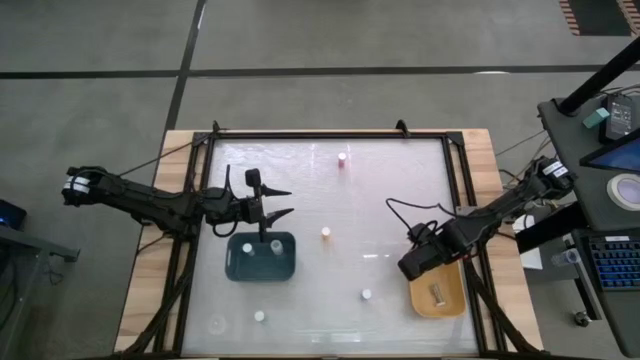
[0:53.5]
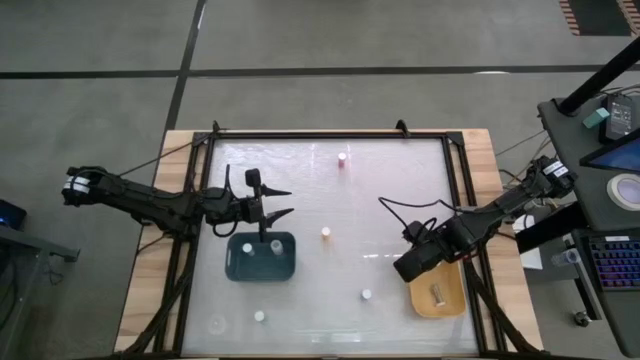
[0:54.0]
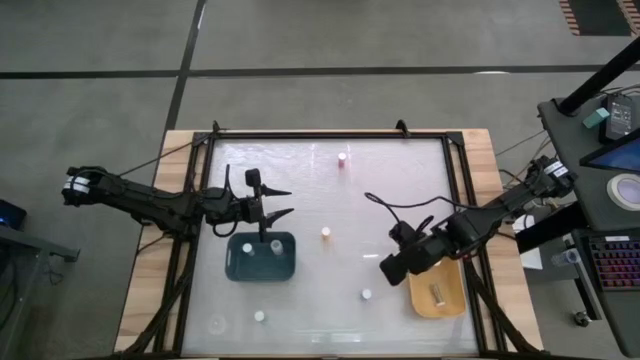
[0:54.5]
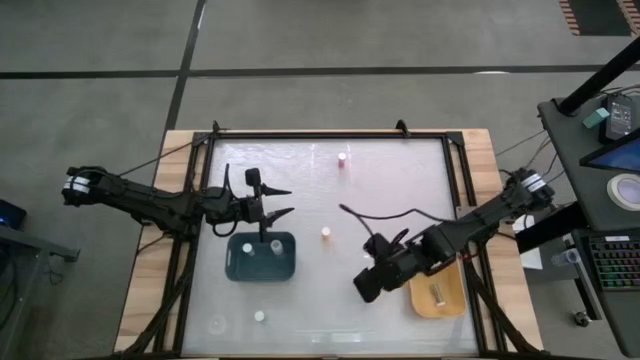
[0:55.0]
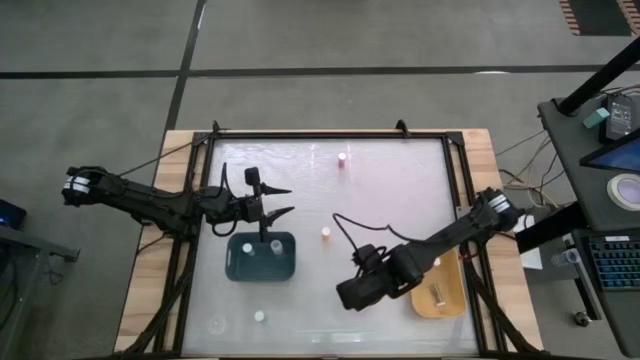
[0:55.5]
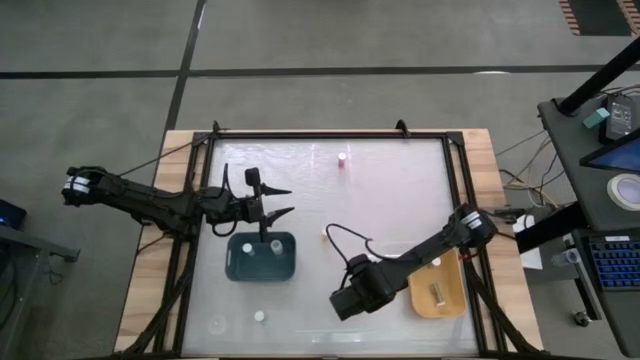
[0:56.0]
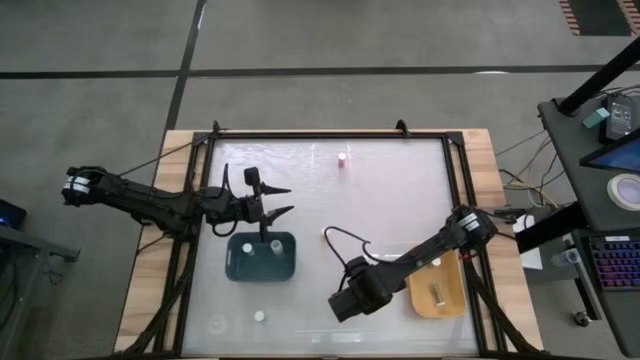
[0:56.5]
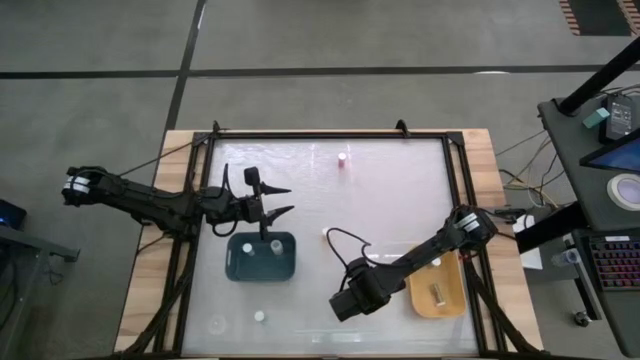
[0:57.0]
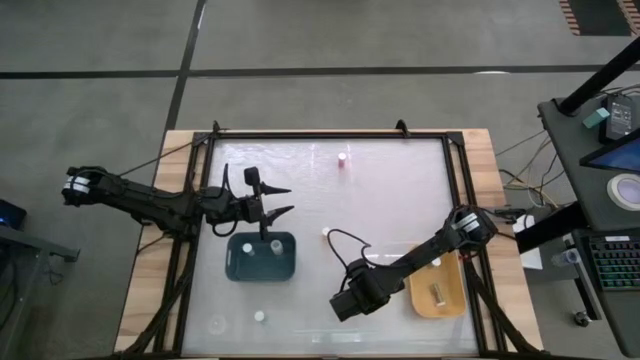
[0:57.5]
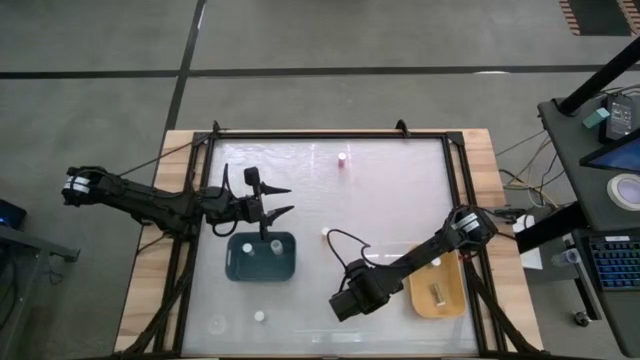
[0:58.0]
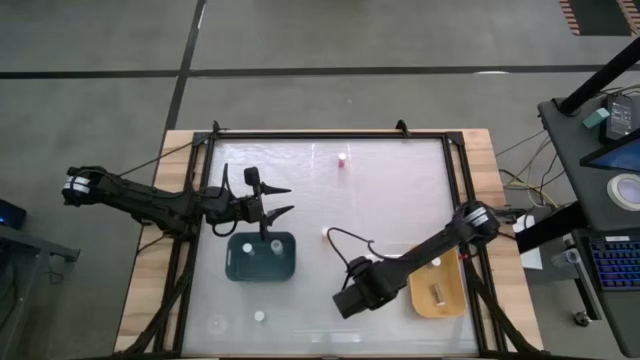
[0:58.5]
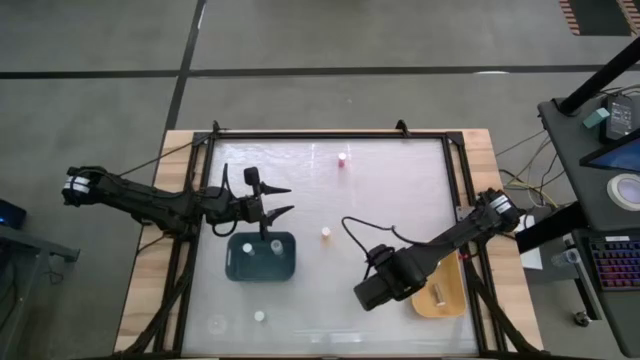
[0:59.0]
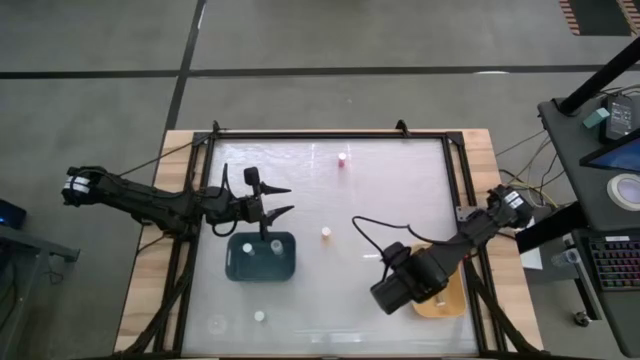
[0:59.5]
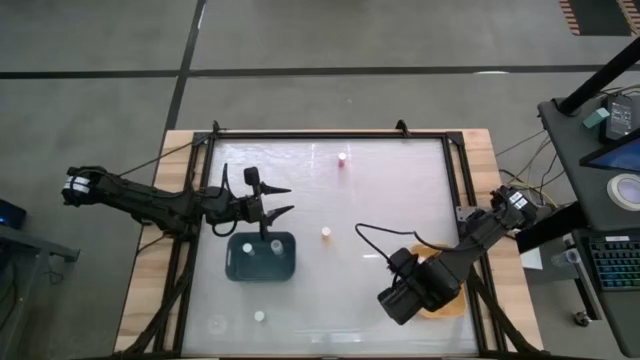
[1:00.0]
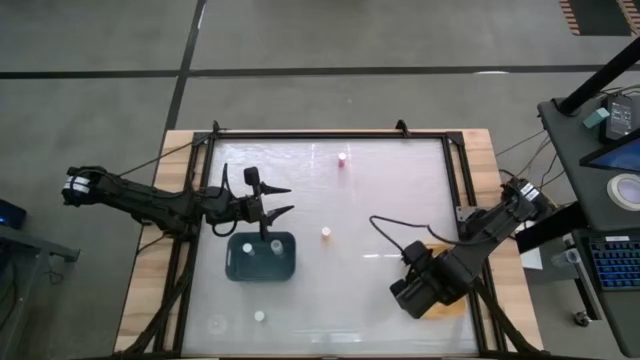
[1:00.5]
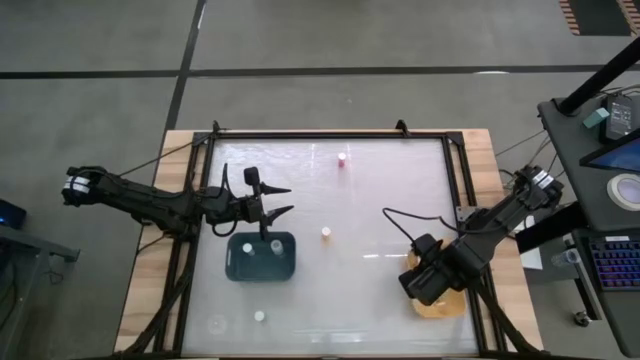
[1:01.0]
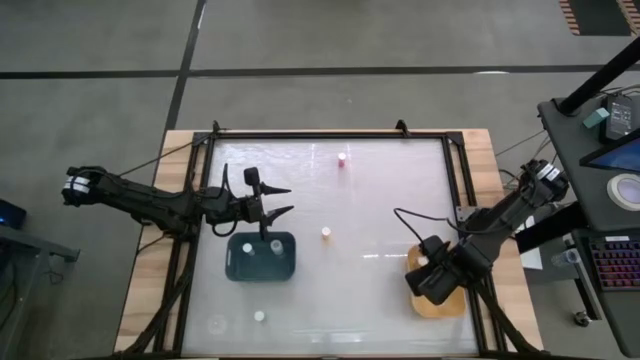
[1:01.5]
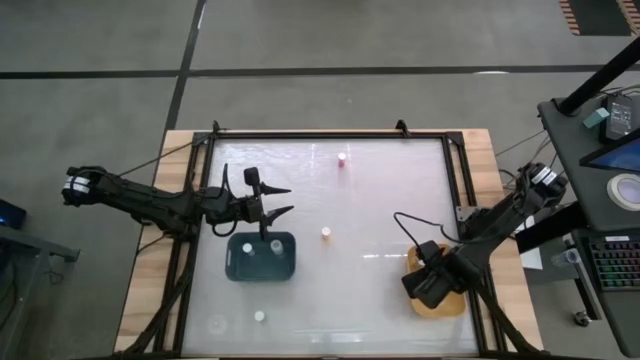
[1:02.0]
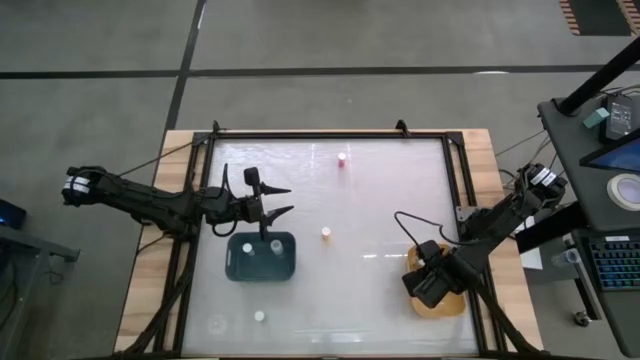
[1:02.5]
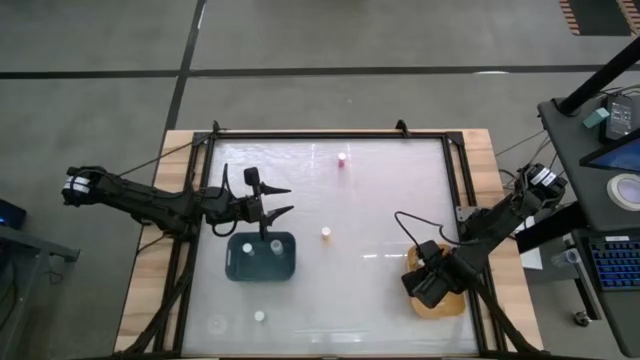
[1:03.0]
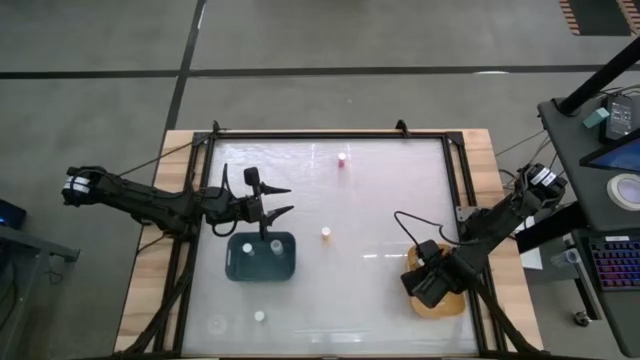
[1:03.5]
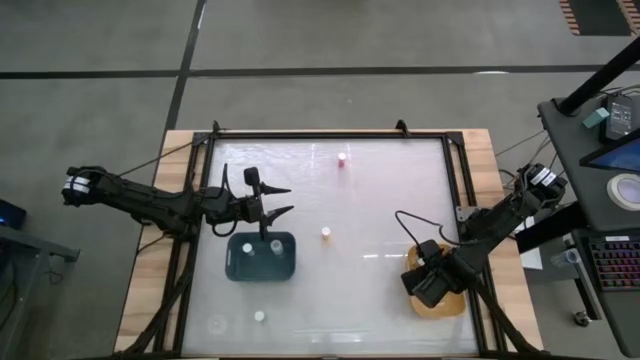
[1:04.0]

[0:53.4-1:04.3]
Task: Pick and place medicine bottles into bin by pill shape (circle, oval)
Put the blue bottled capsules into the yellow bin

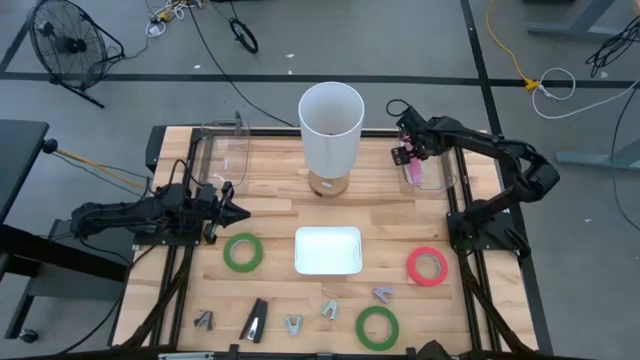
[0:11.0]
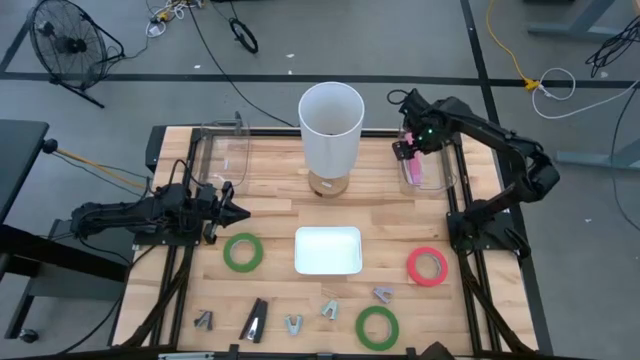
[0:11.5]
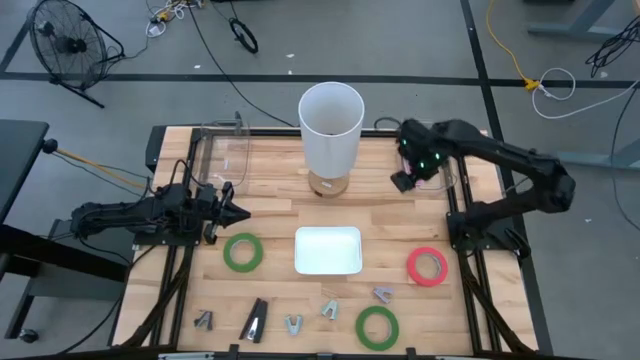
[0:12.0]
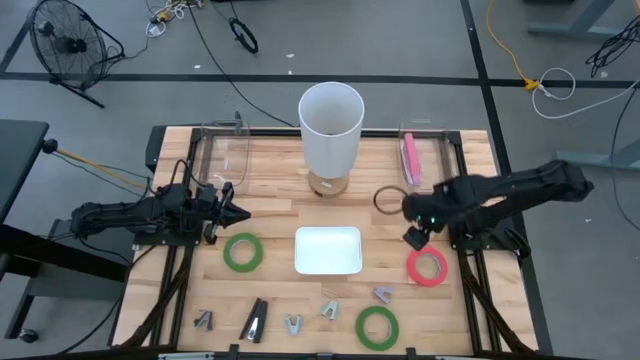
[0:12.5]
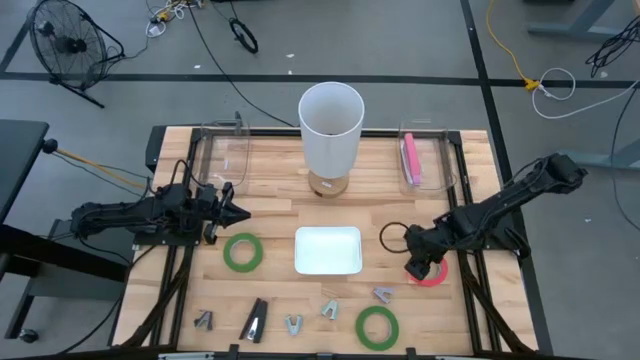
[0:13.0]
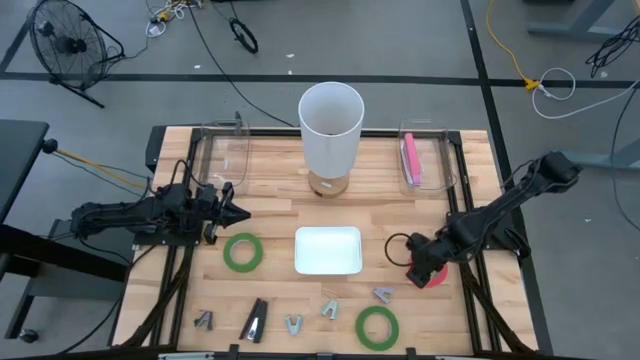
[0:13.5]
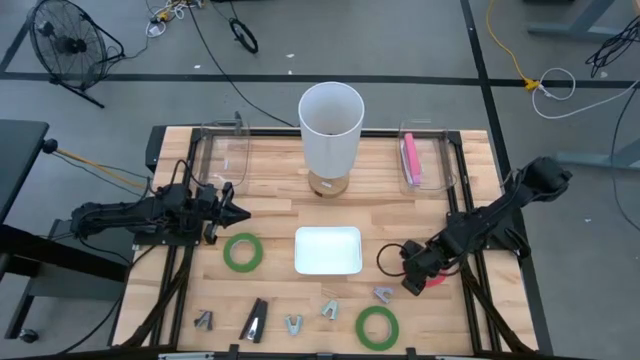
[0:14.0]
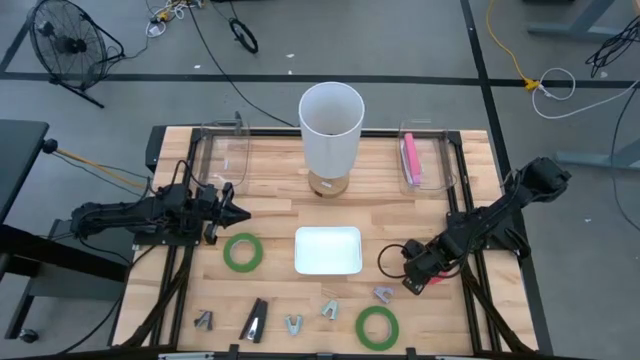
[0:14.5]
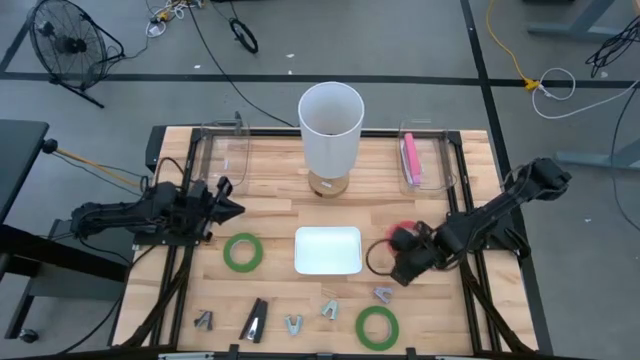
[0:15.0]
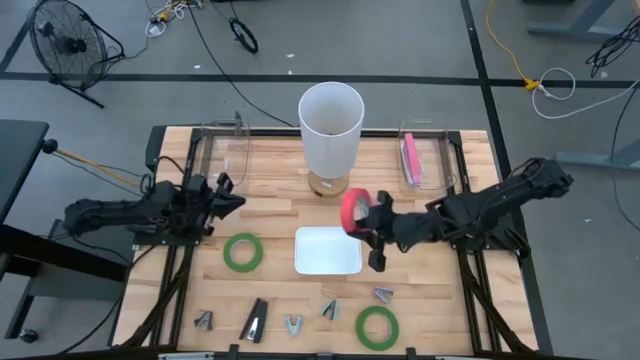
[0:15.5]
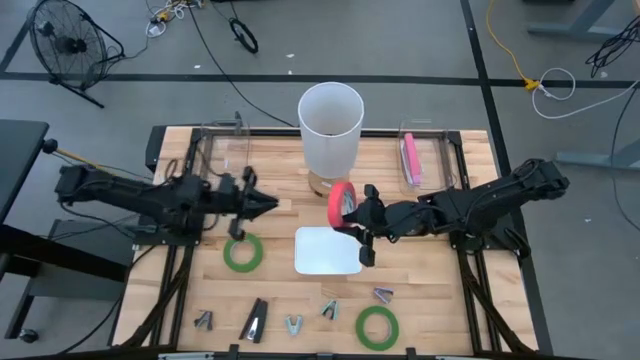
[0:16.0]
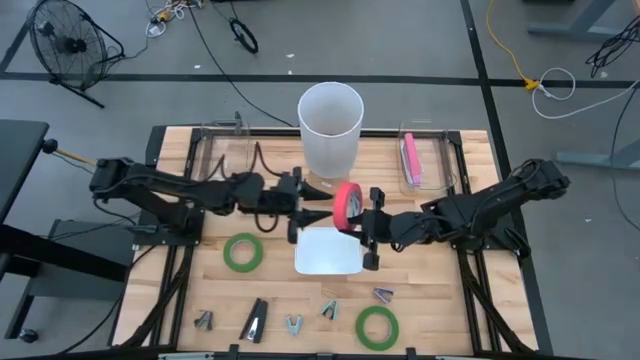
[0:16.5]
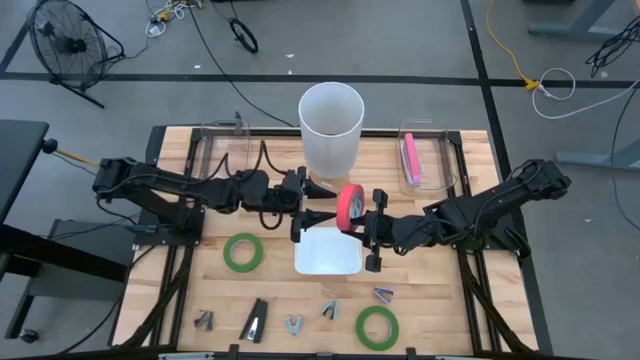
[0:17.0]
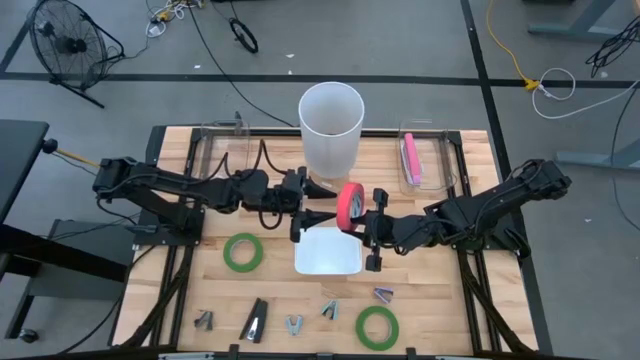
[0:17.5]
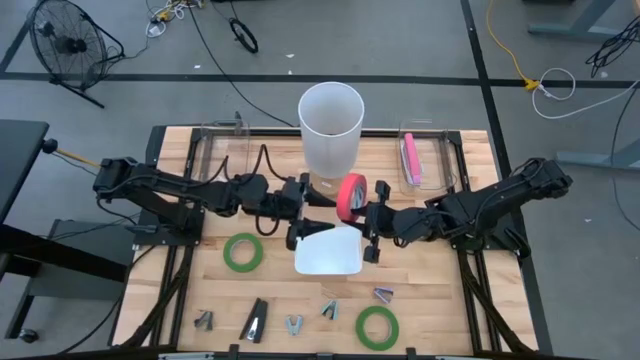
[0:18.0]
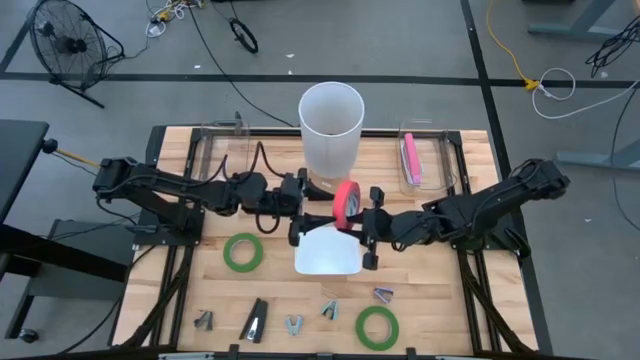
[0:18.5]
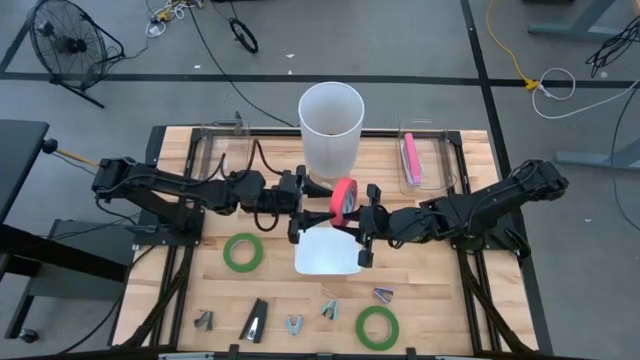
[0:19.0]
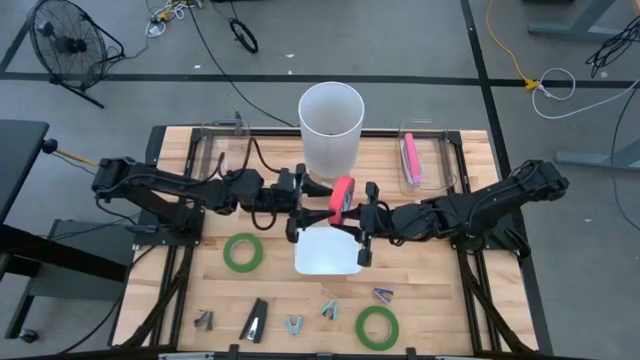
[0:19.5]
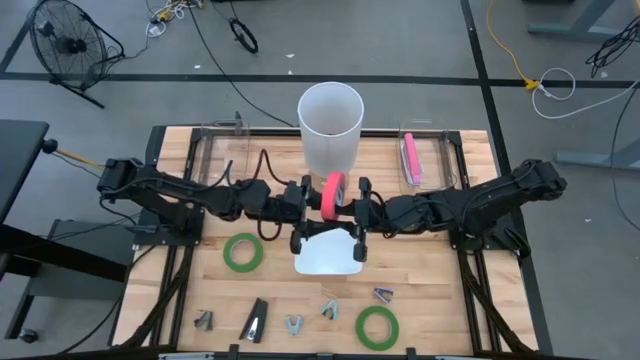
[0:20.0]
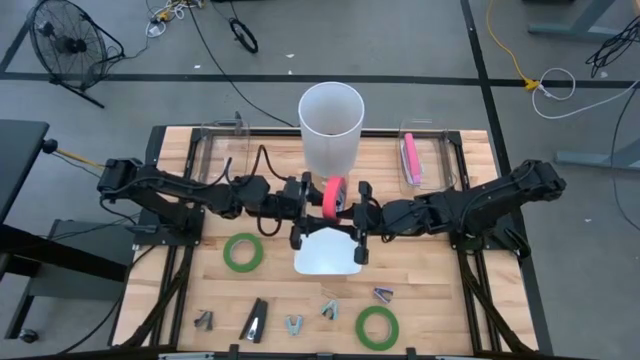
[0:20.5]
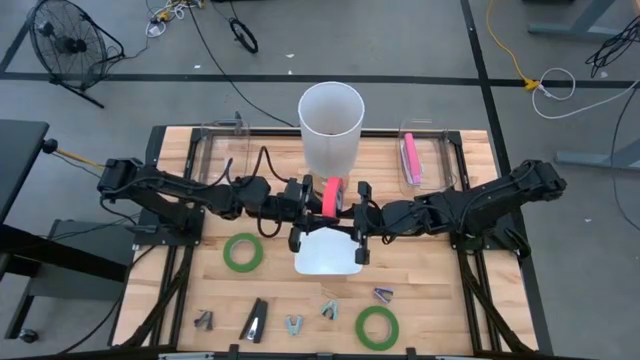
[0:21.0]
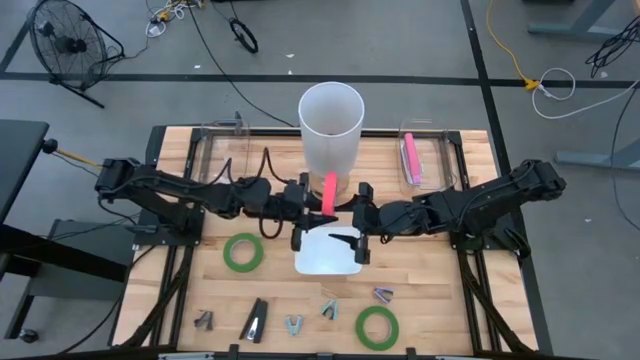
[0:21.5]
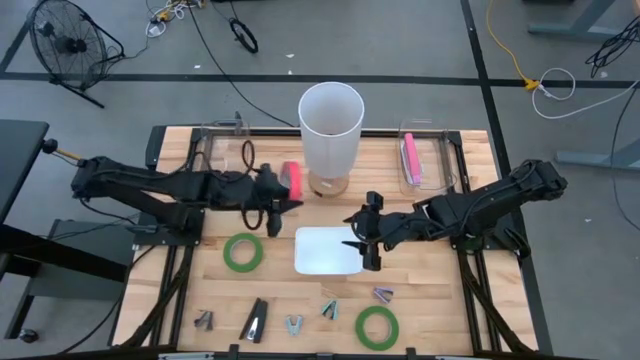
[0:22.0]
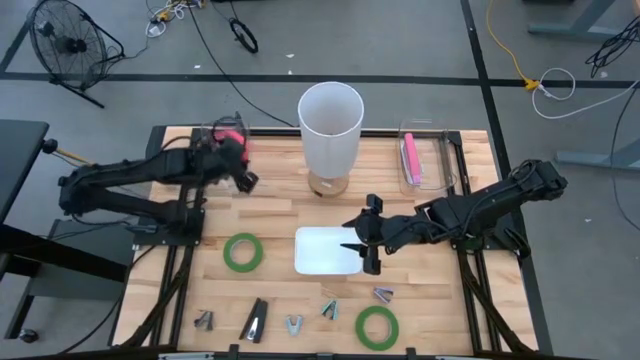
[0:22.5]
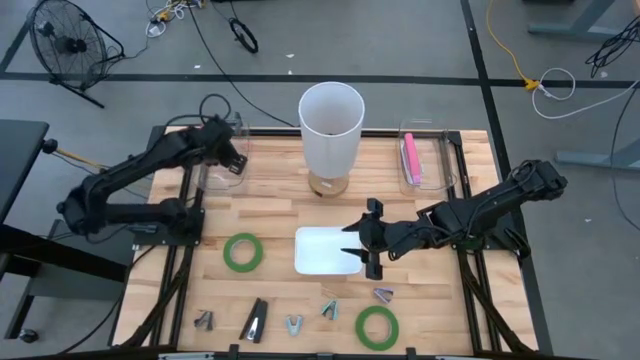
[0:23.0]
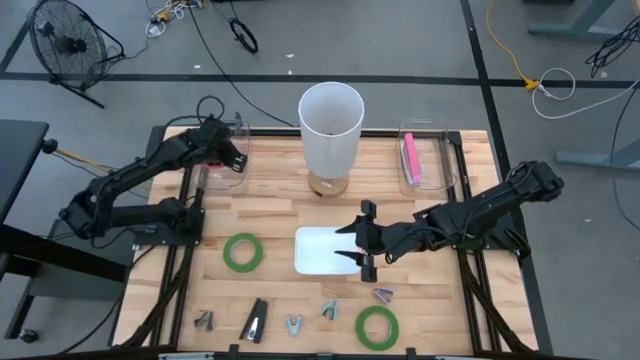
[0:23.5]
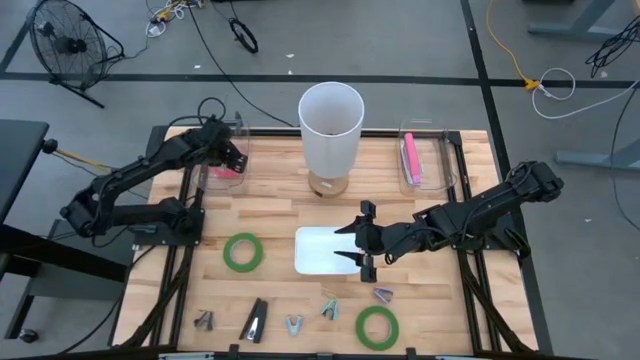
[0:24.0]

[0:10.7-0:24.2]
Task: Pick and place Stapler, Stapler remover, tape
Put the pink tape into the left transparent bin
